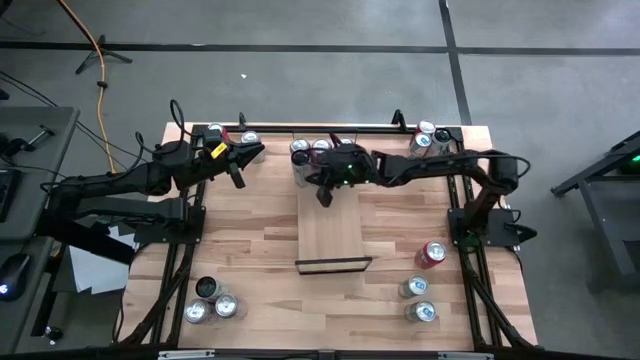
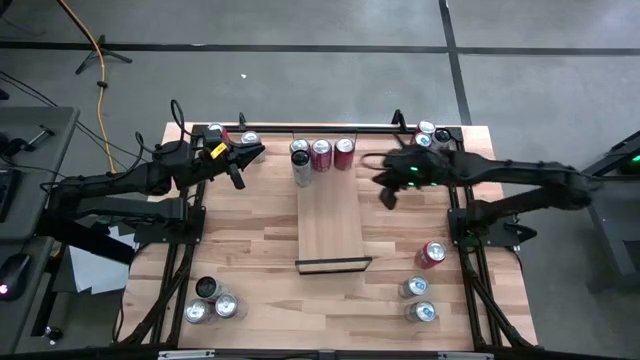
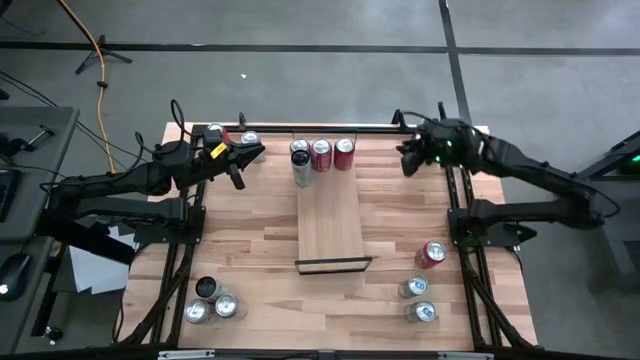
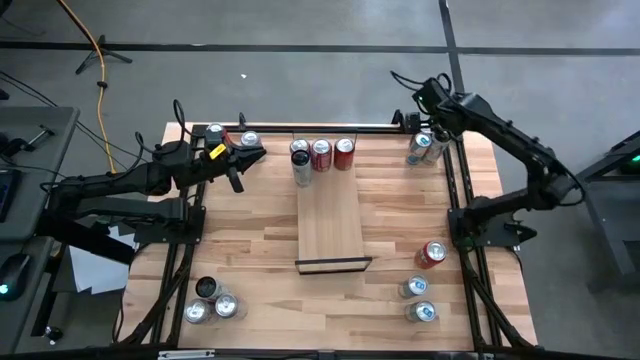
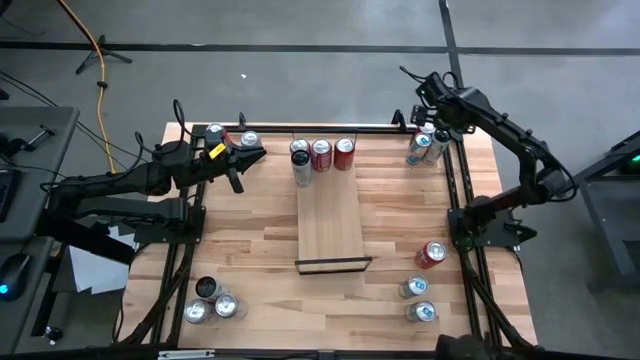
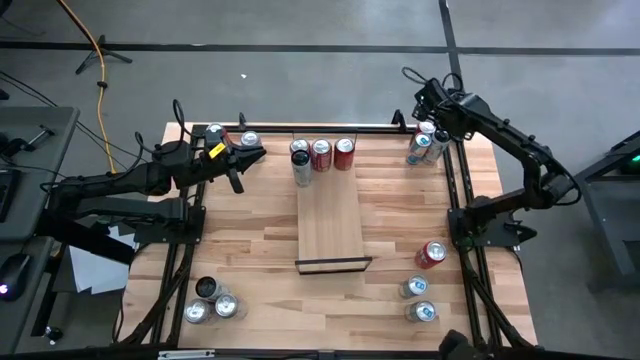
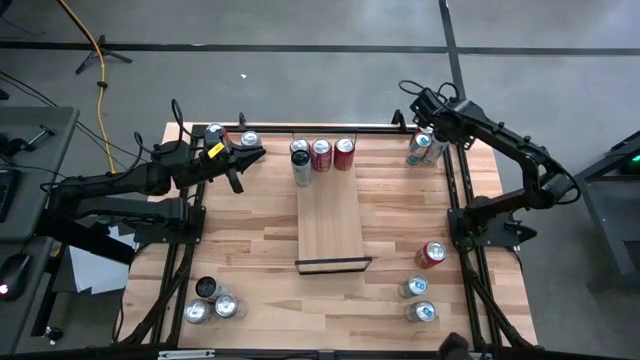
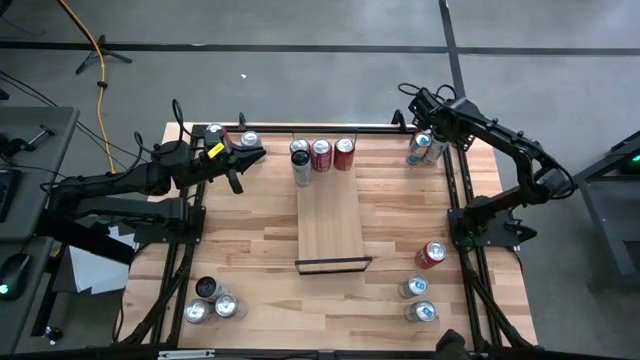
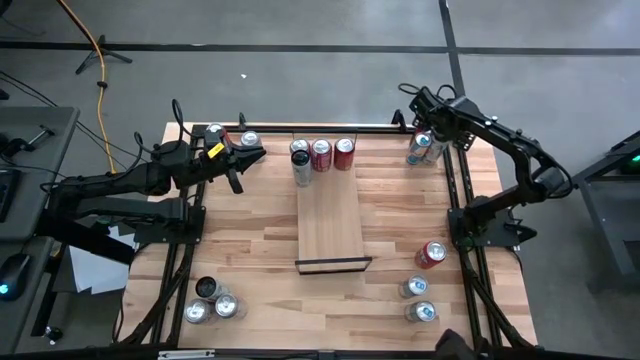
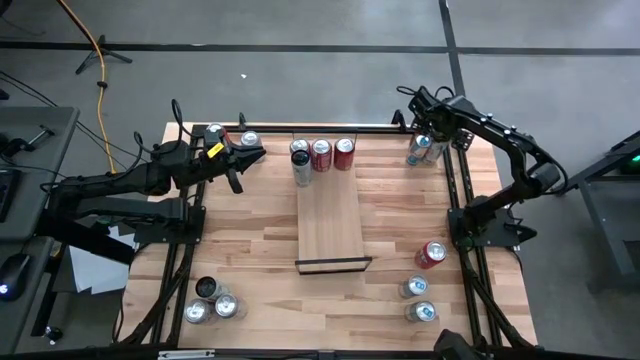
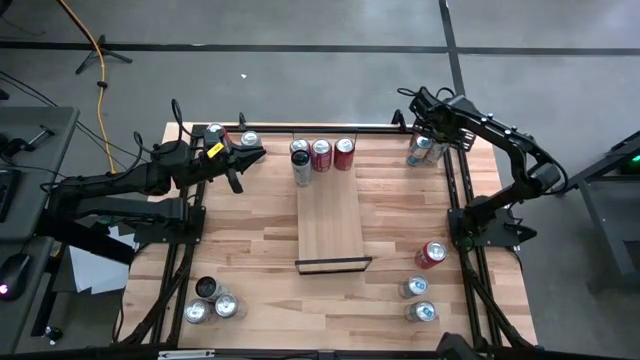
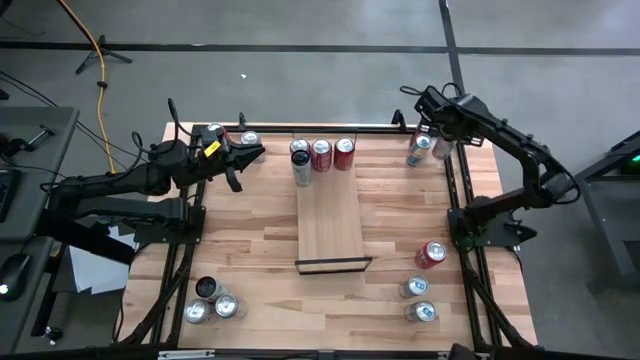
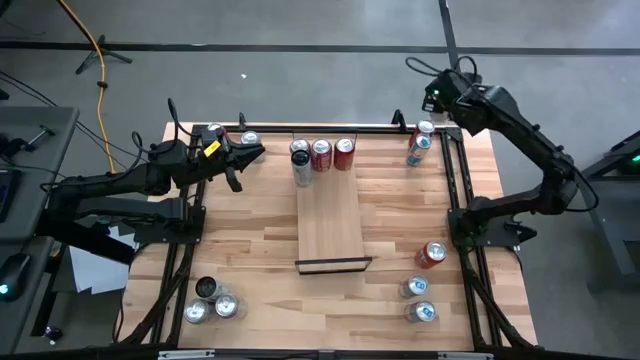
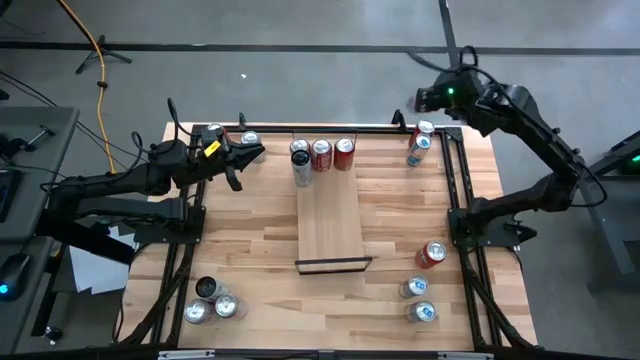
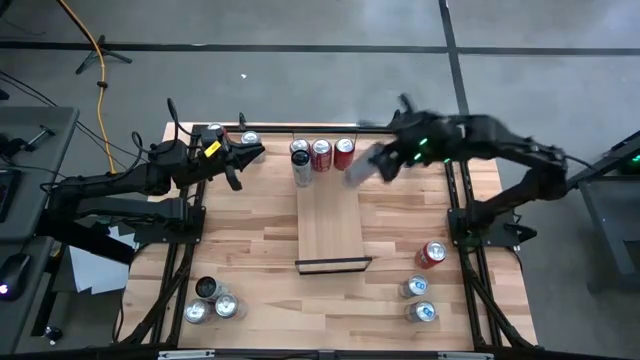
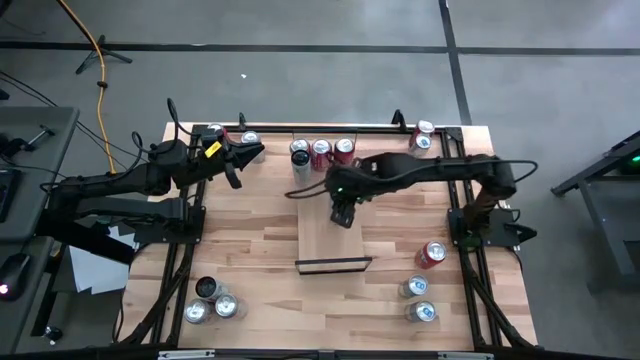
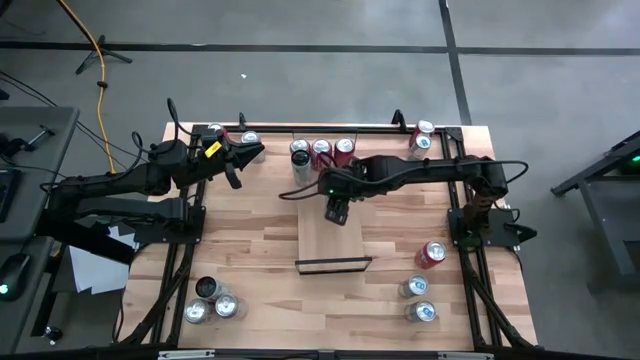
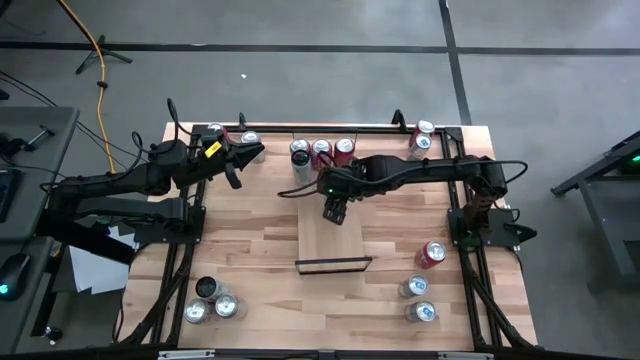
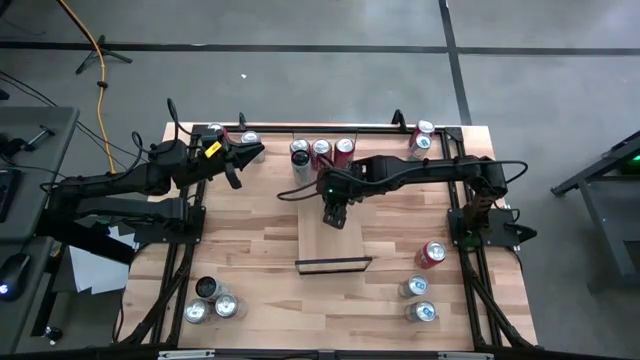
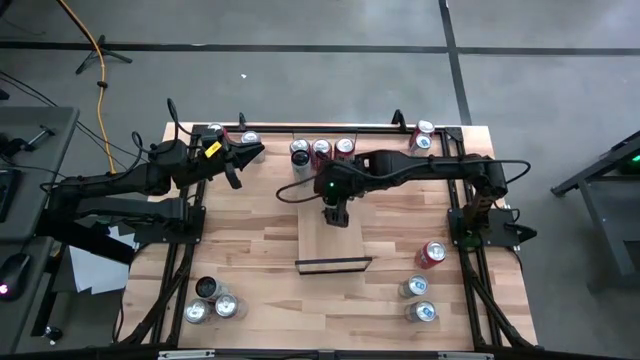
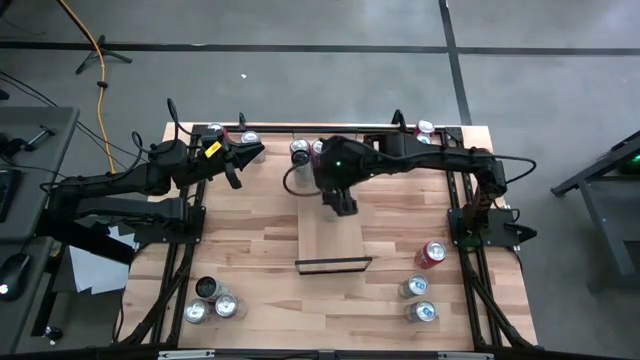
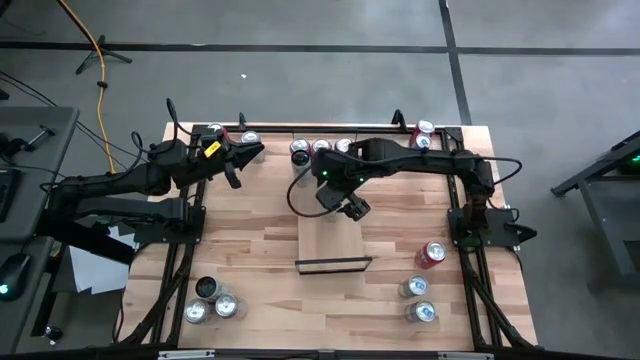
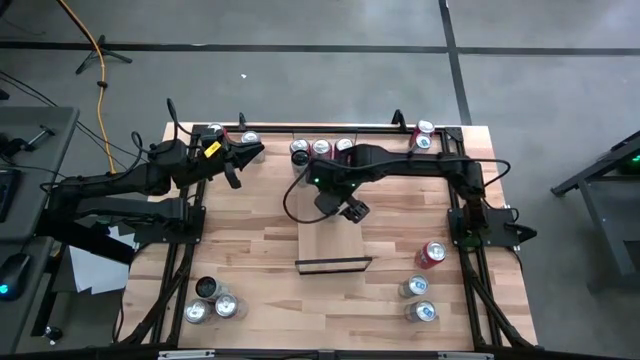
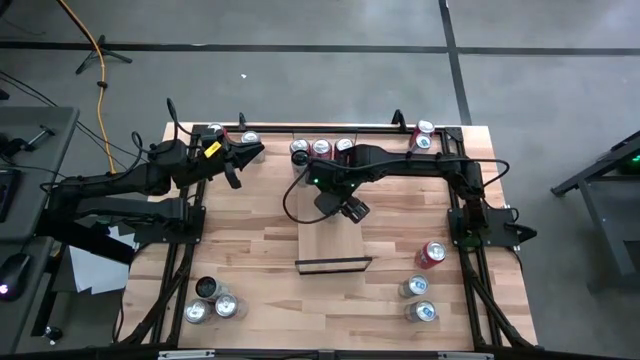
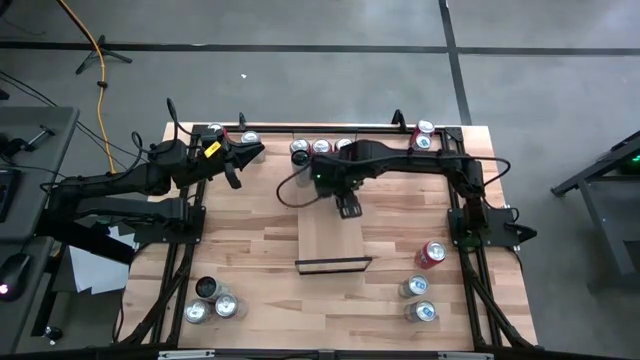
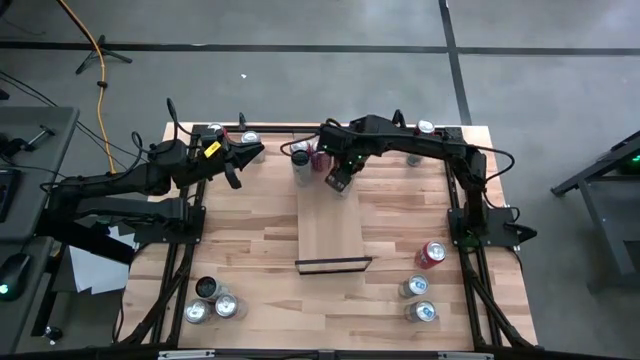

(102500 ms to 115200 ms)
Task: Place canned beverage on shelf
Put the black soda can on the shelf aligned with the other black soda can

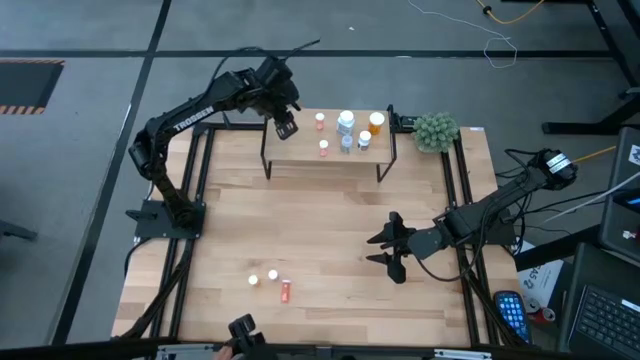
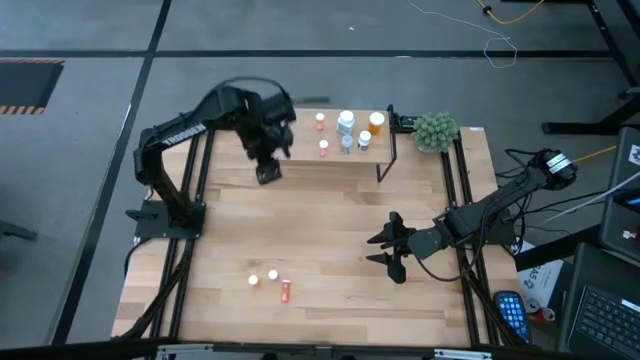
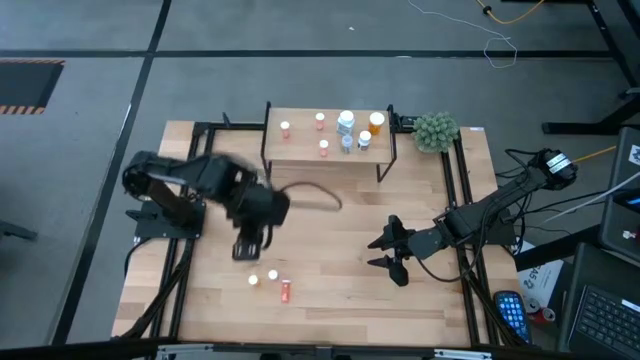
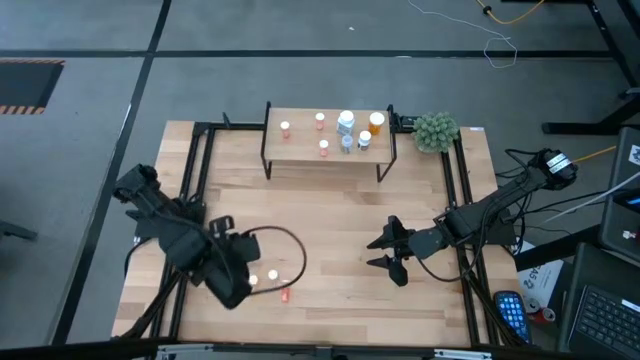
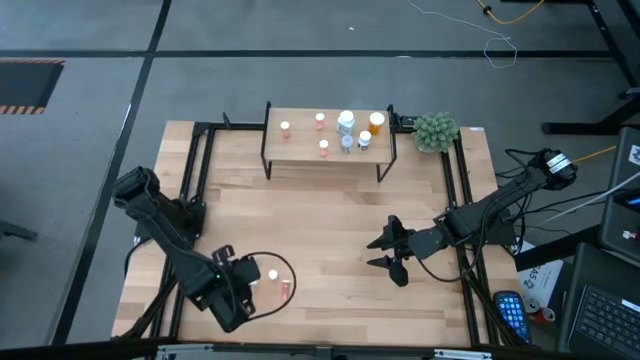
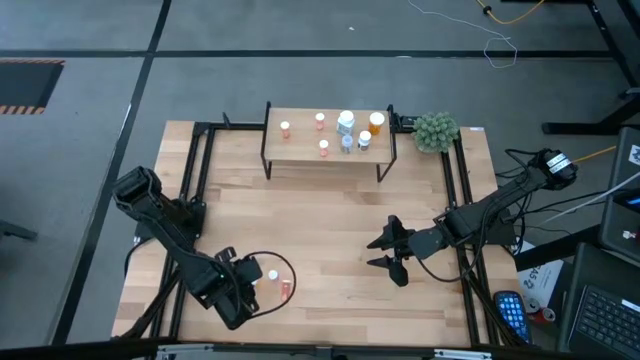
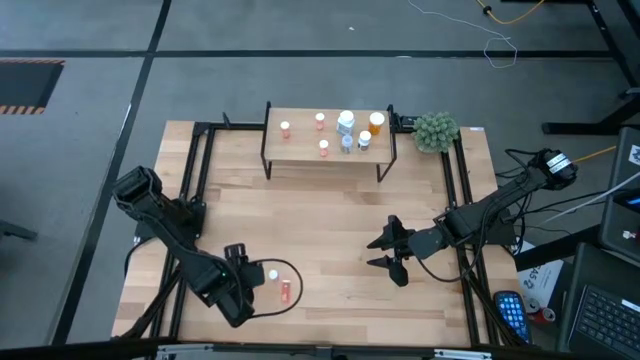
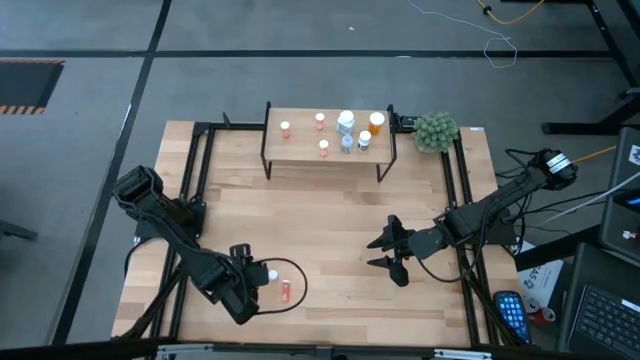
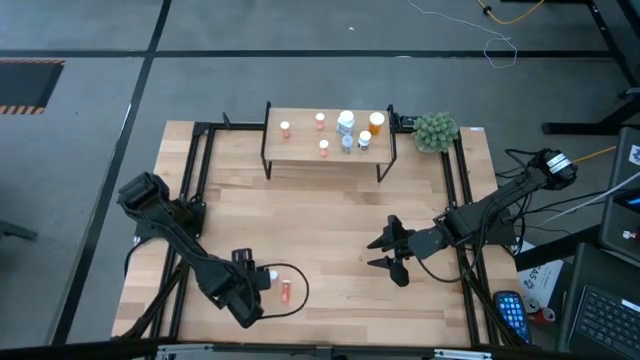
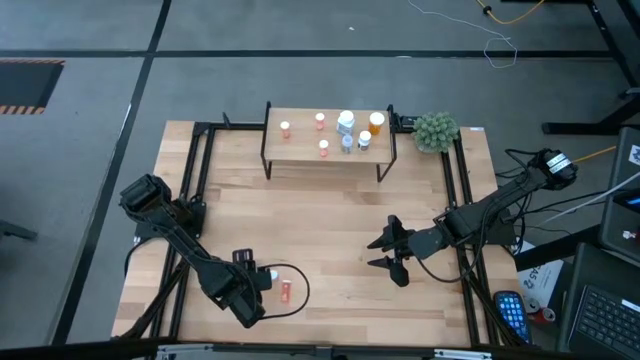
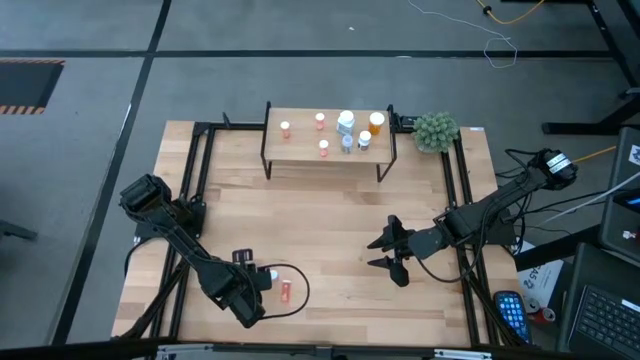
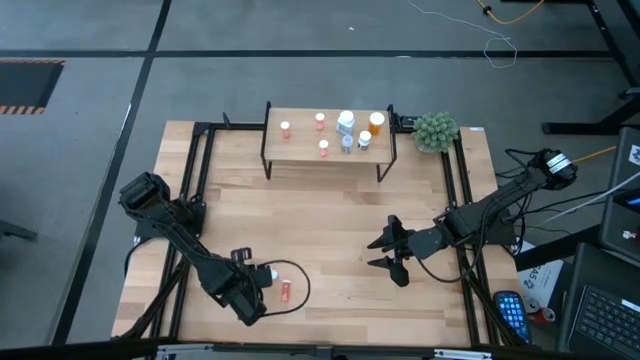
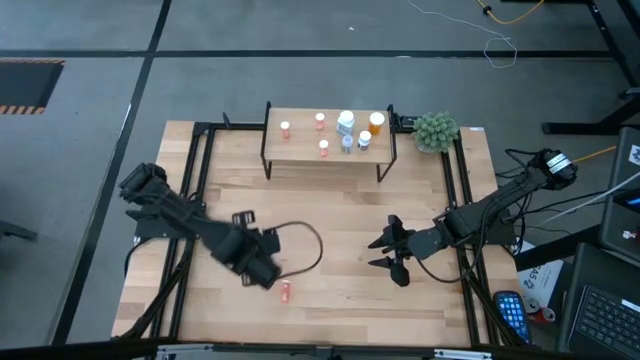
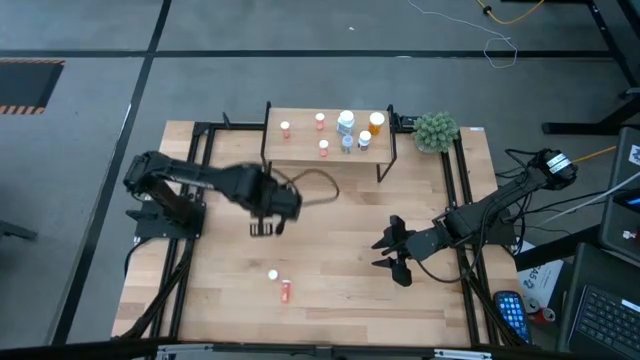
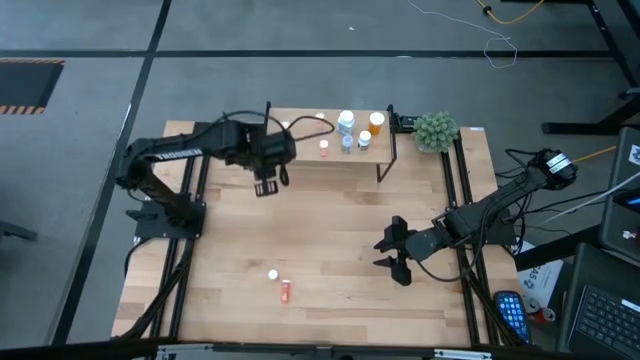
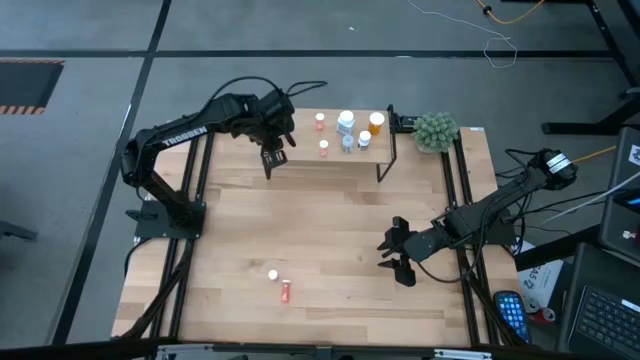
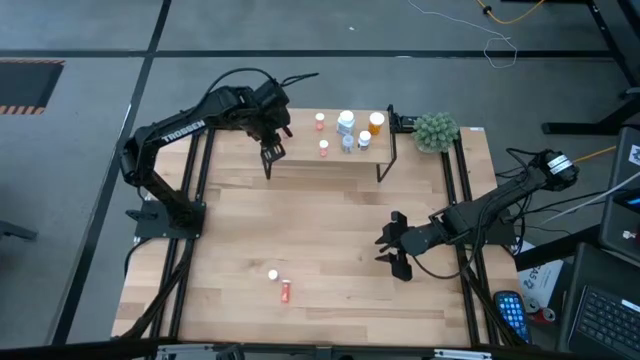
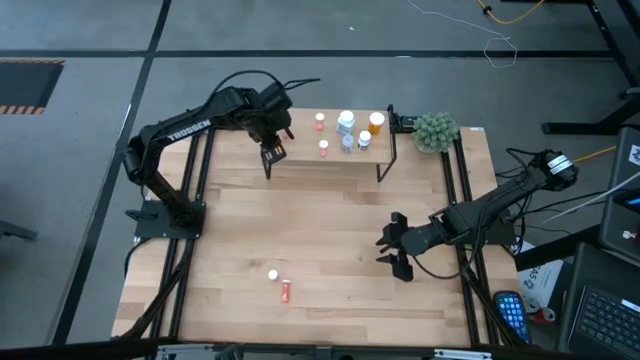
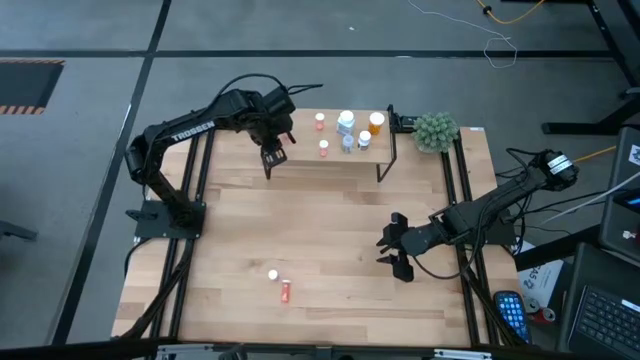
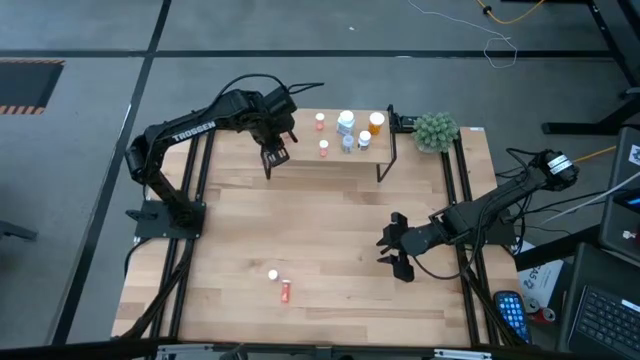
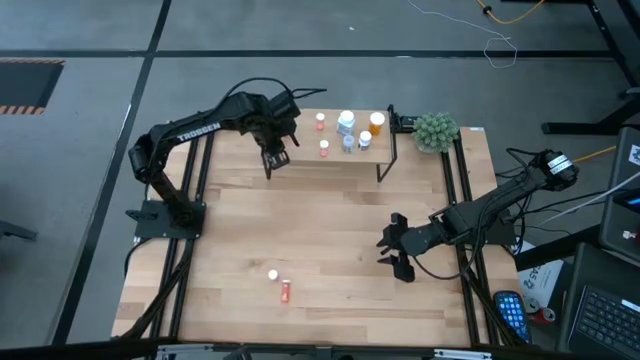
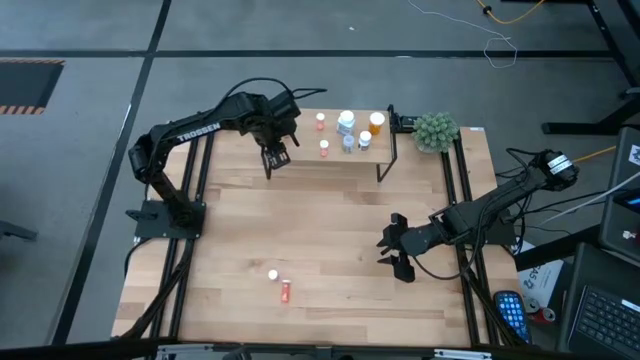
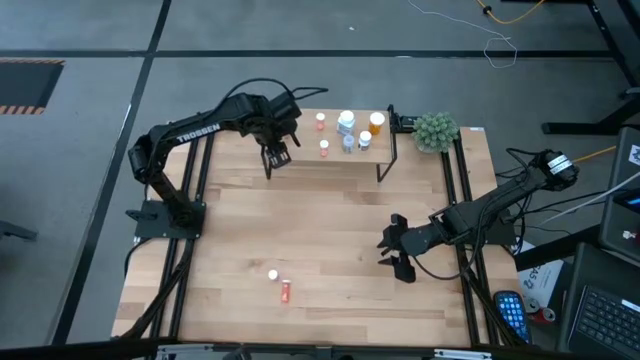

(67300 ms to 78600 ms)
Task: Pick and place medicine bottles onto shelf by color
Put the small orange pill bottle on the shelf
